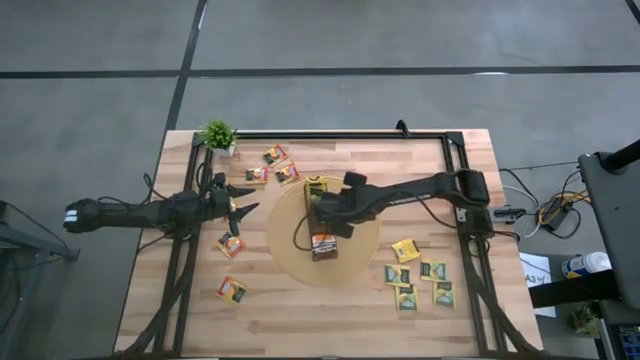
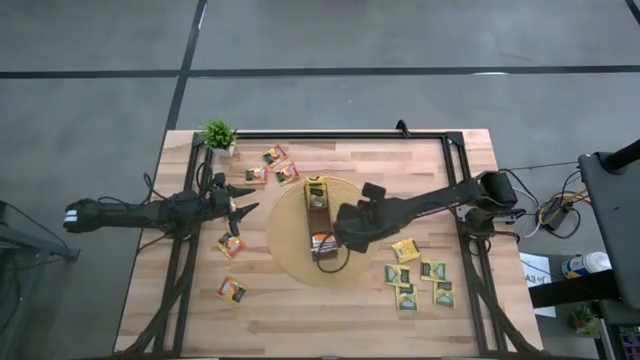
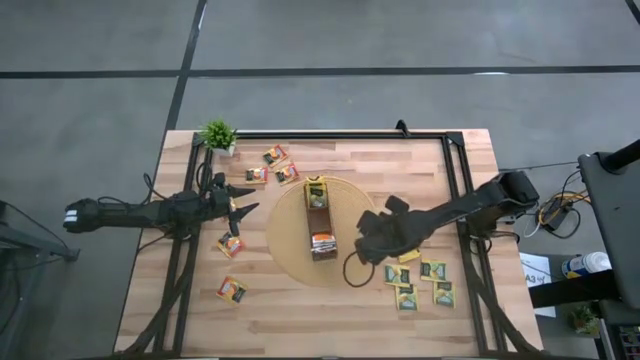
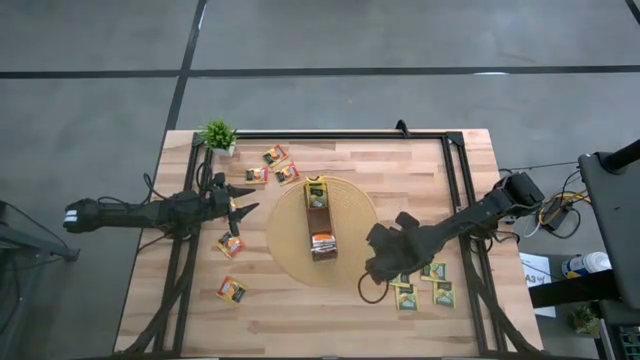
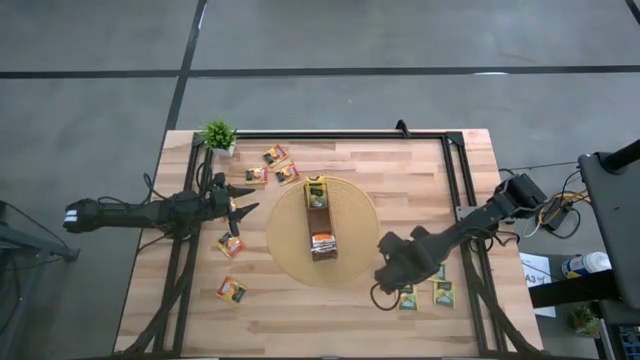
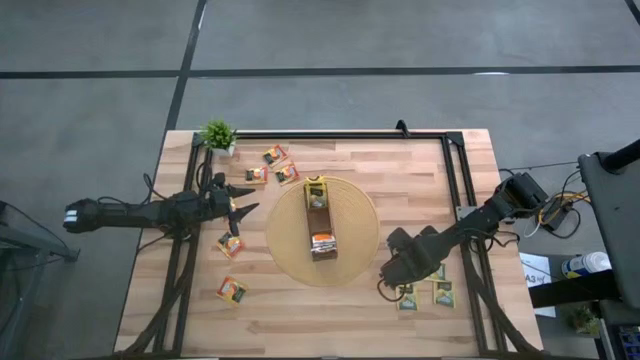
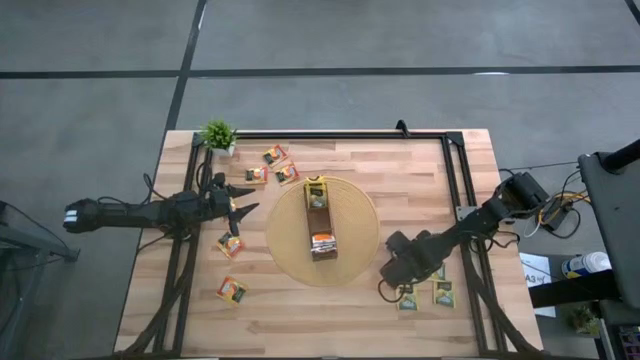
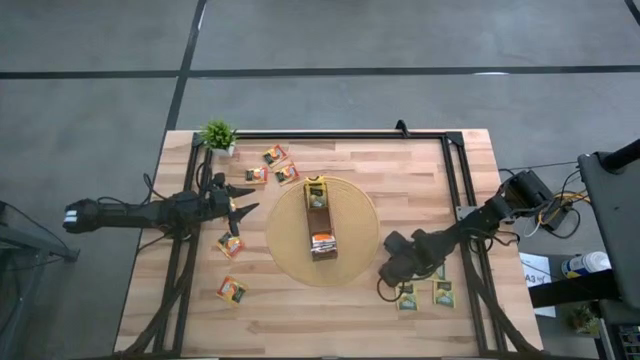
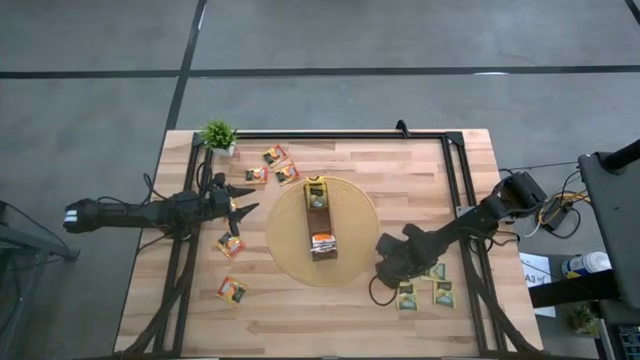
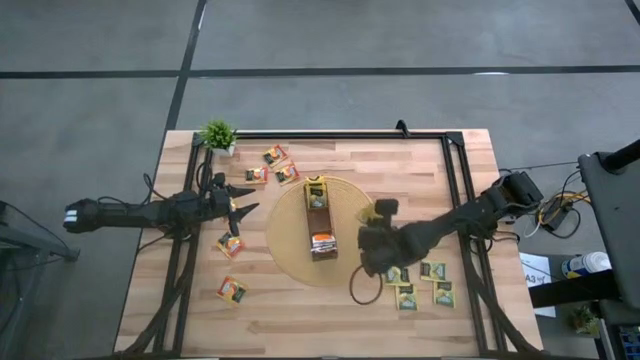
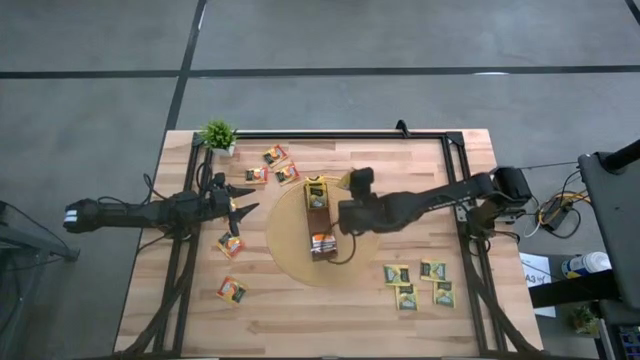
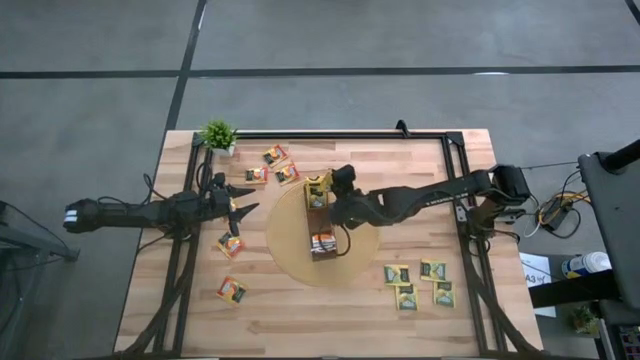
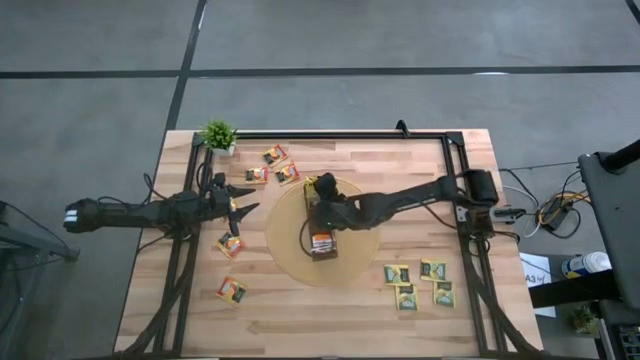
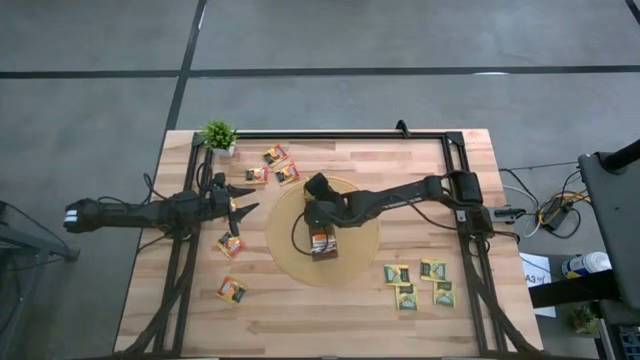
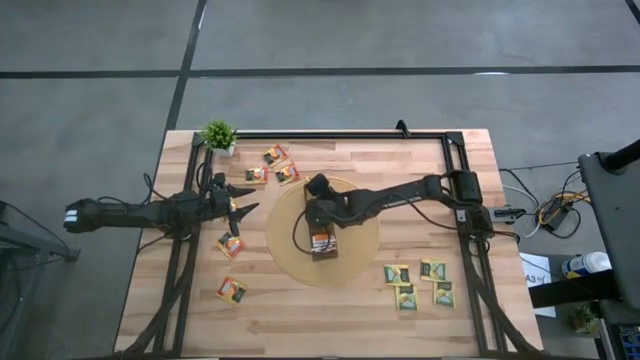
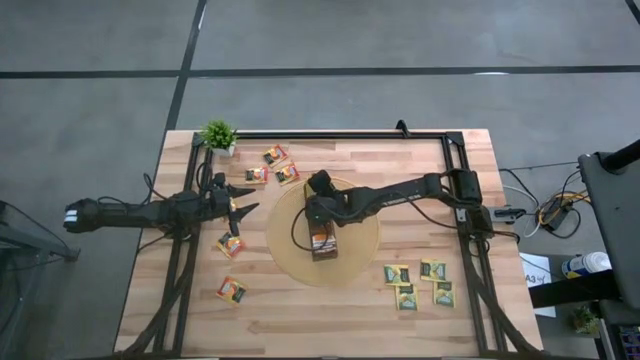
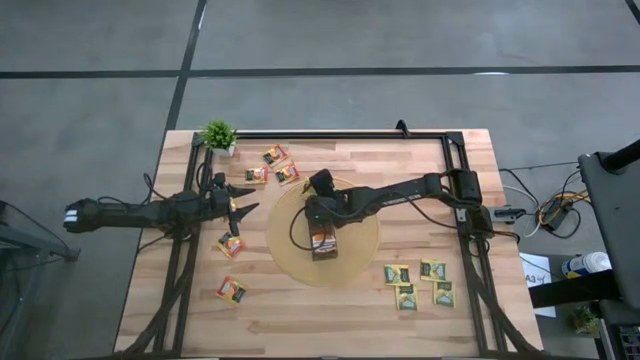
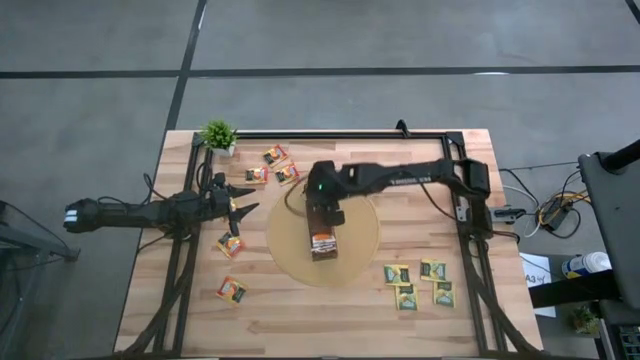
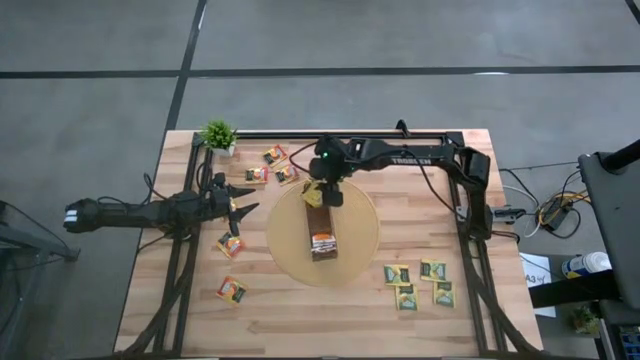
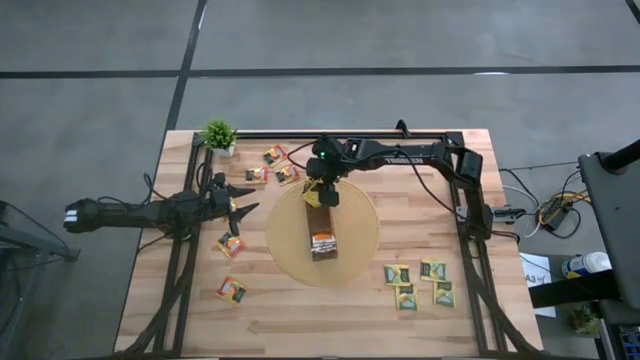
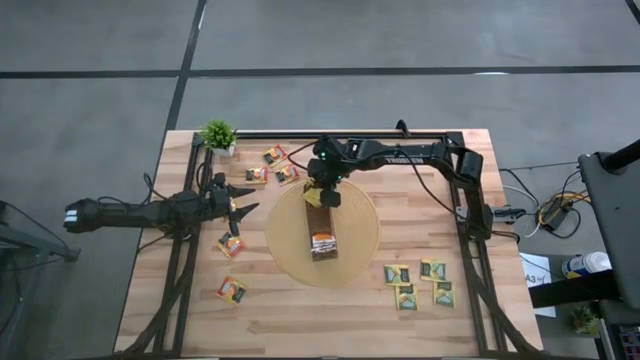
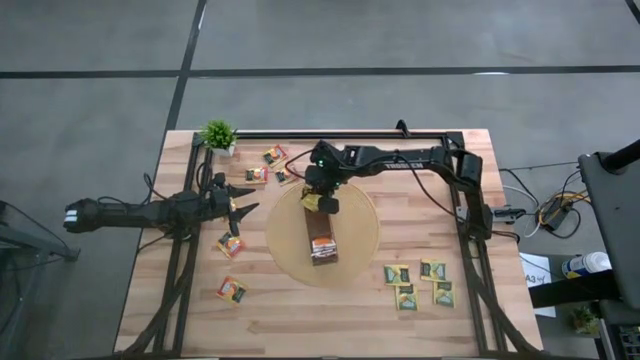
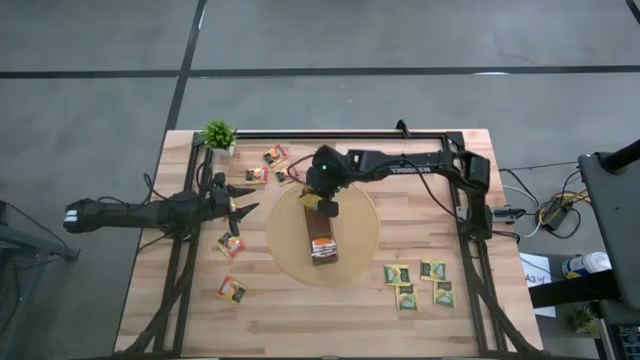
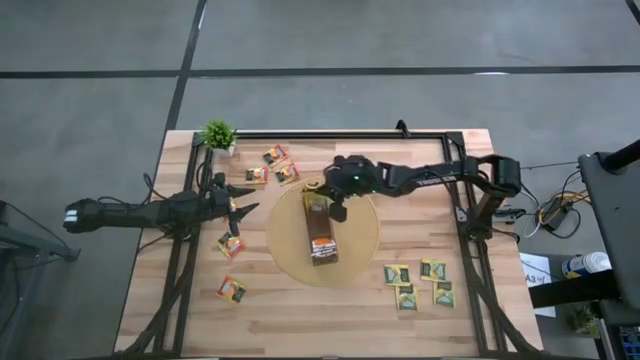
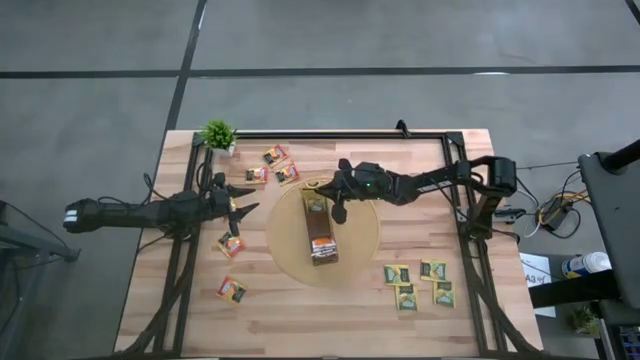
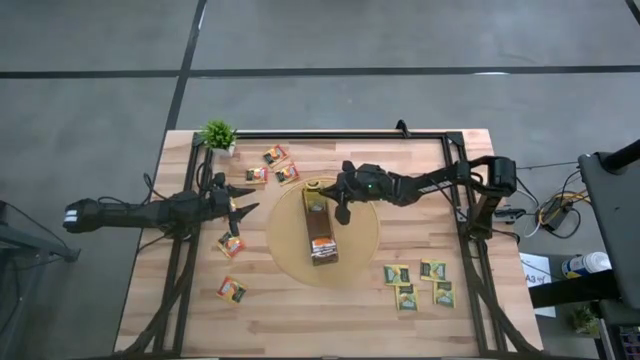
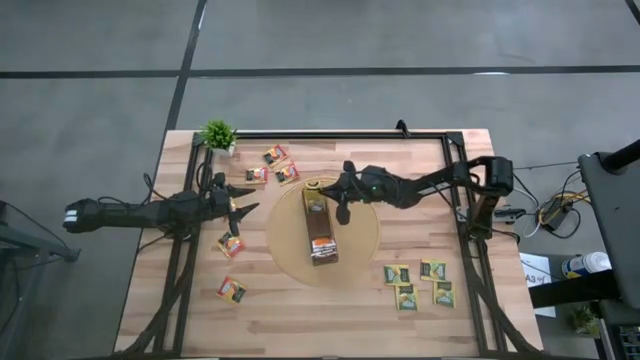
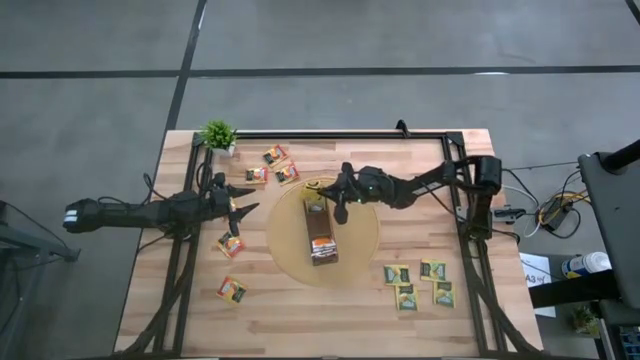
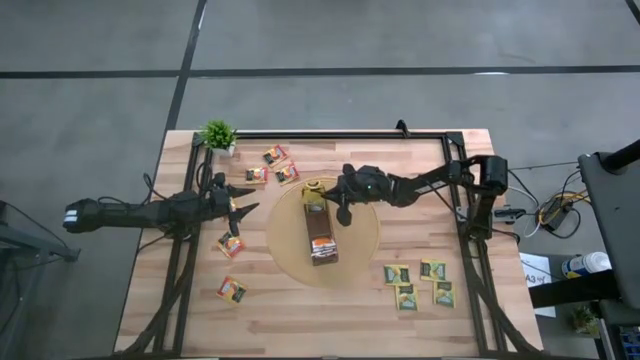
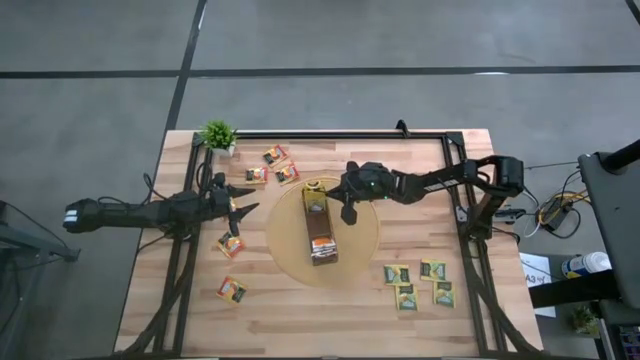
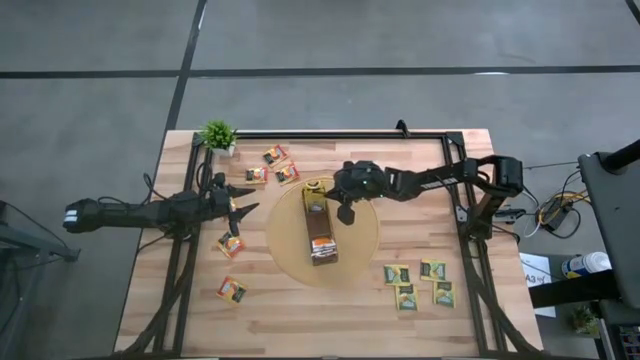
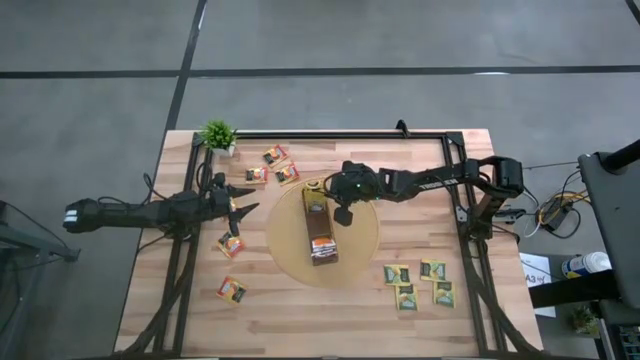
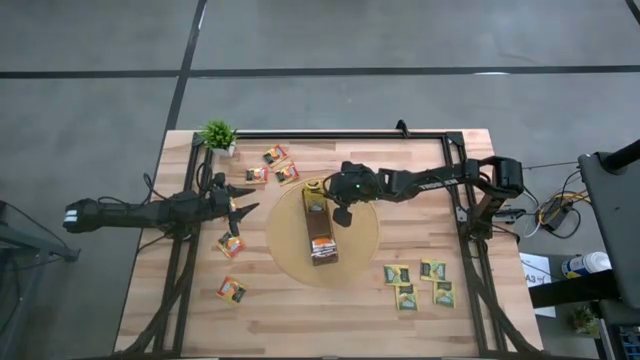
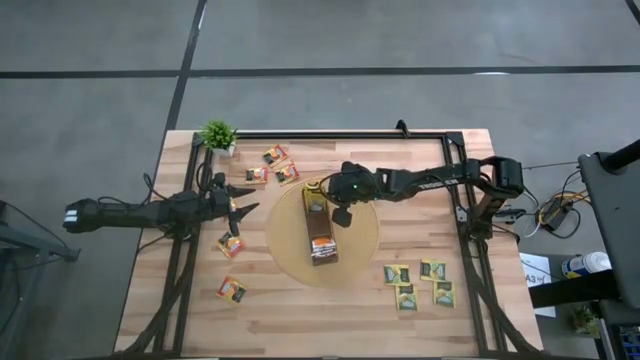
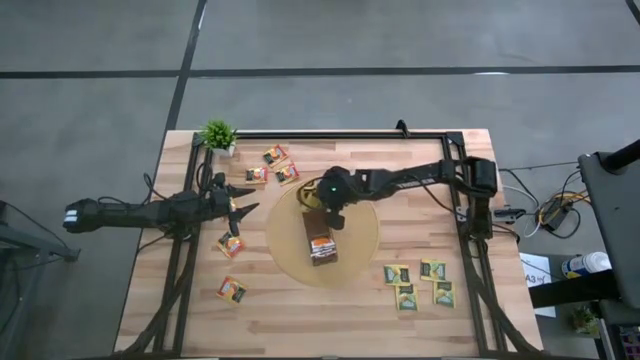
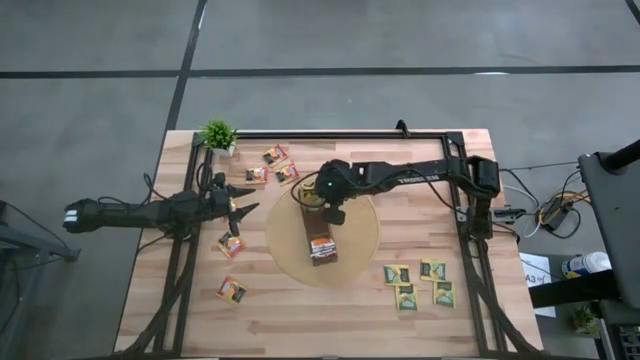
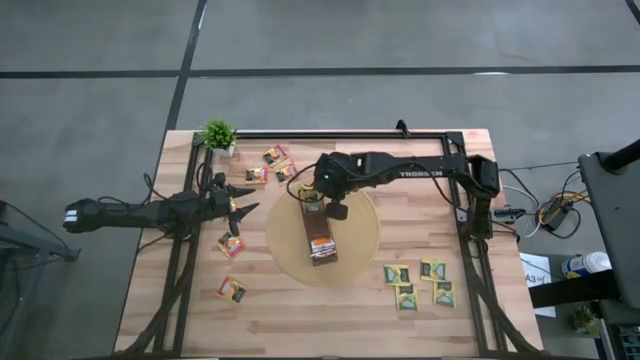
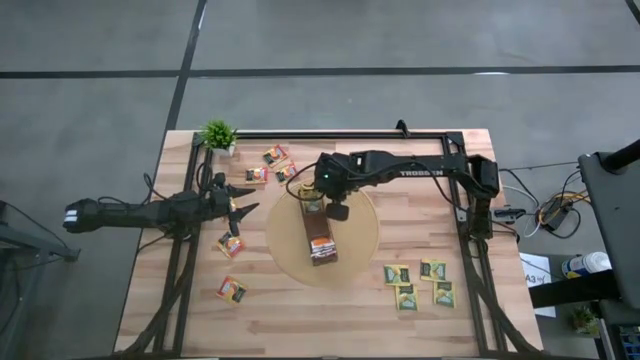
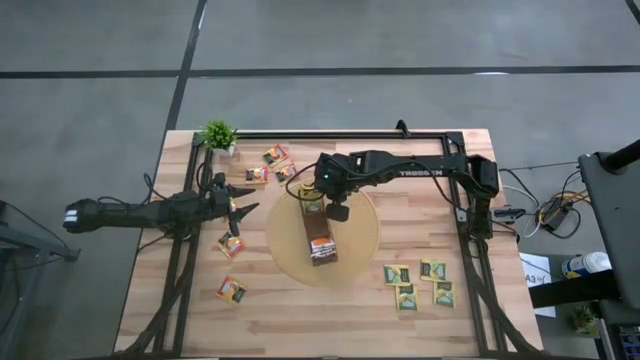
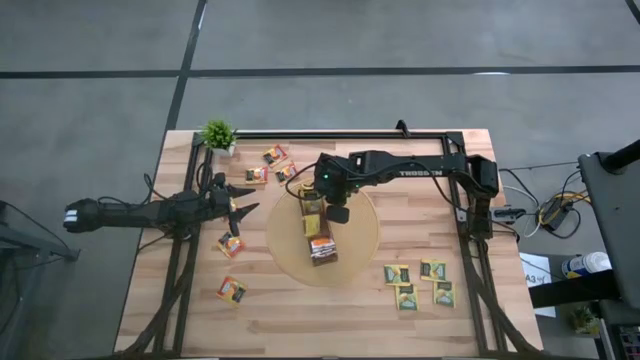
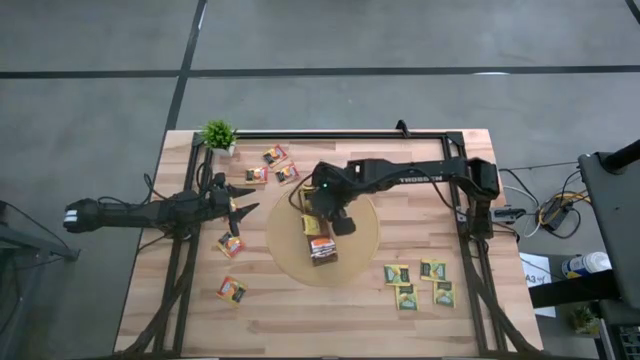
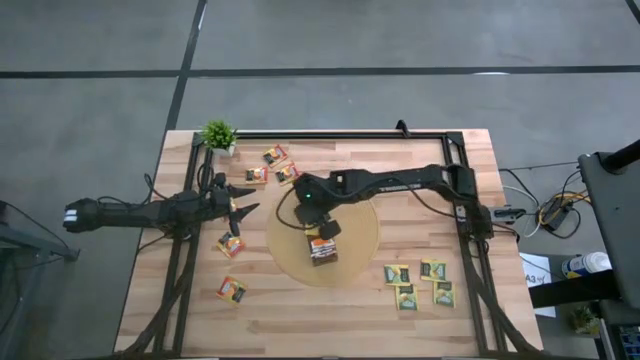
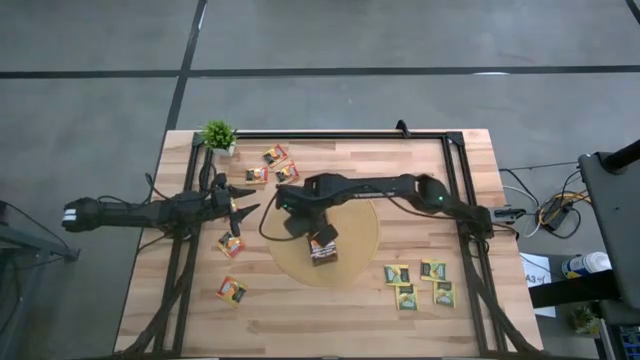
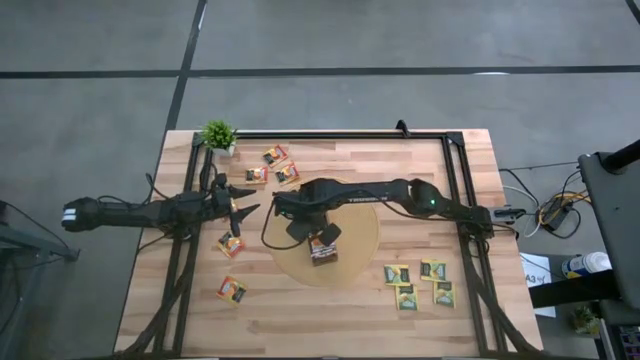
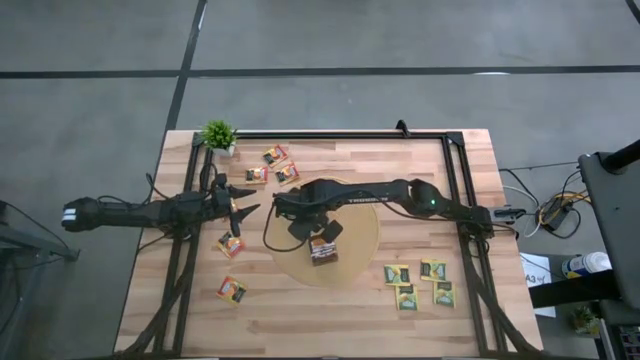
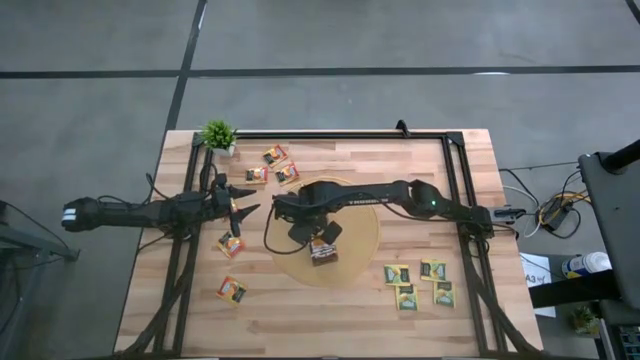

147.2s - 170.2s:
Task: Pick & Place Tea
Put the yellow tea bag into the top section of the wooden organizer
